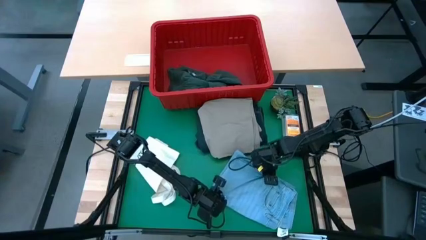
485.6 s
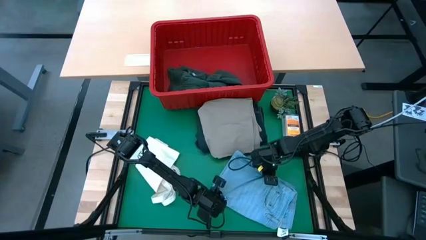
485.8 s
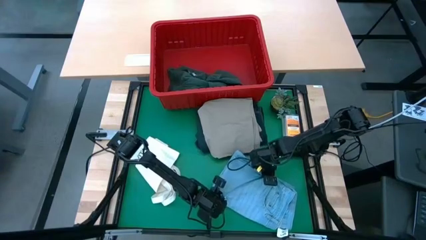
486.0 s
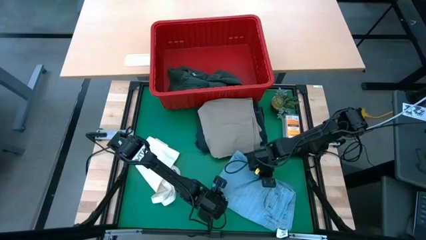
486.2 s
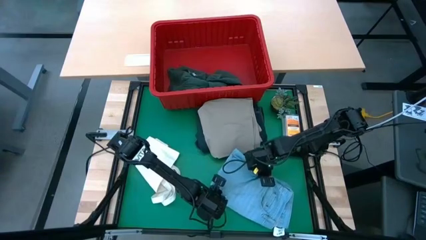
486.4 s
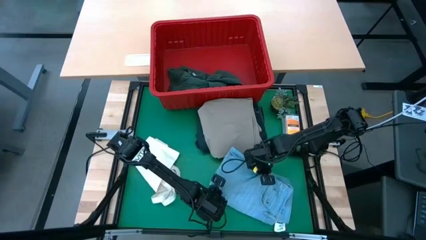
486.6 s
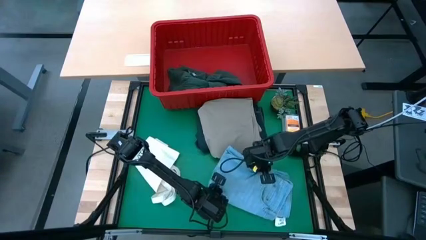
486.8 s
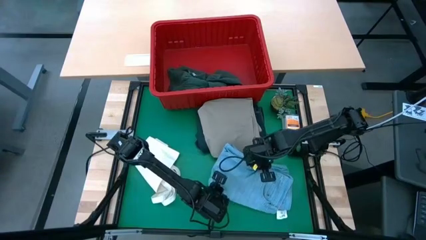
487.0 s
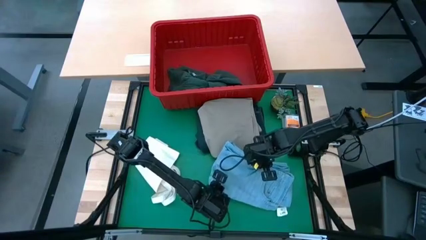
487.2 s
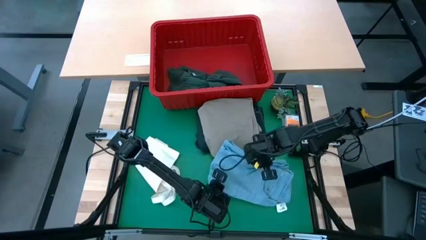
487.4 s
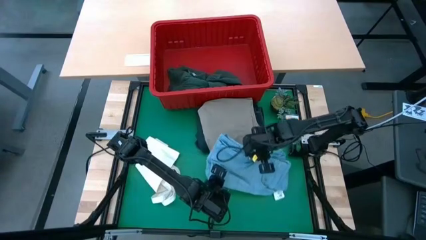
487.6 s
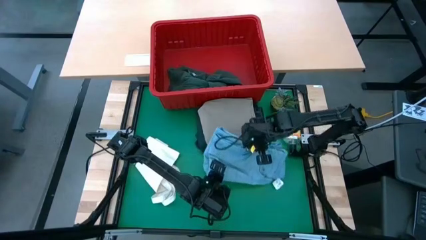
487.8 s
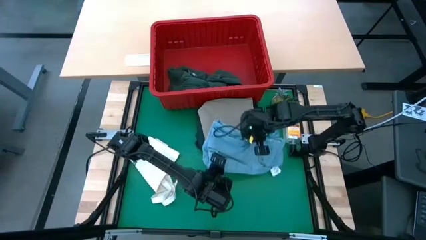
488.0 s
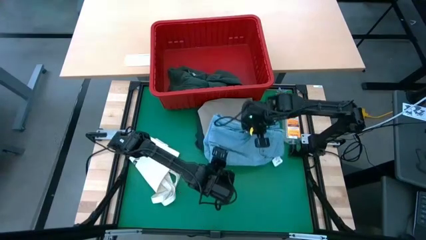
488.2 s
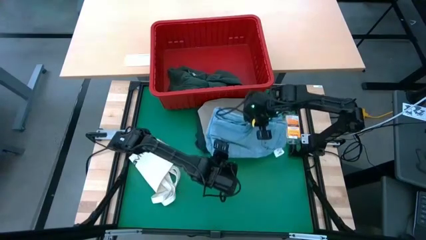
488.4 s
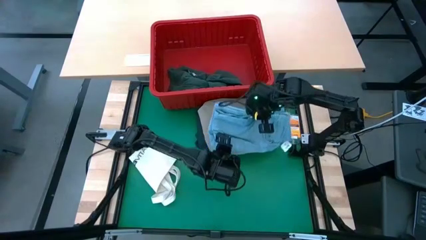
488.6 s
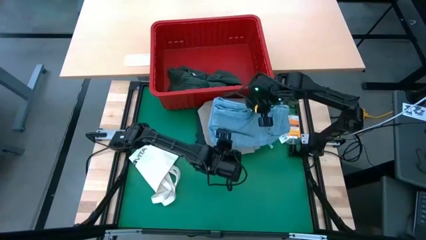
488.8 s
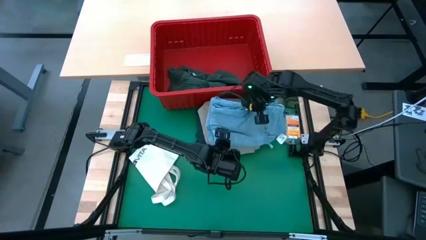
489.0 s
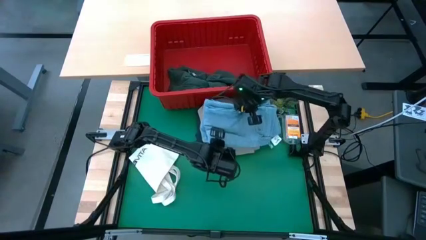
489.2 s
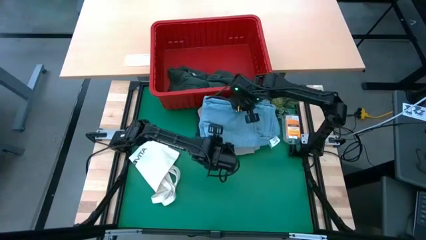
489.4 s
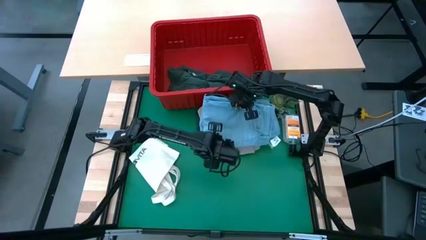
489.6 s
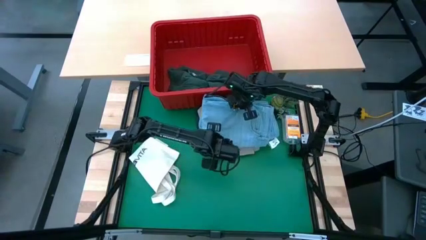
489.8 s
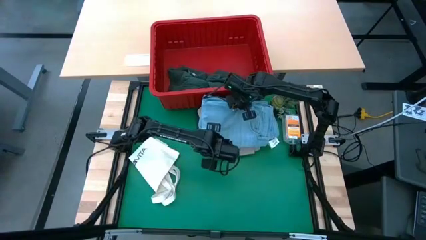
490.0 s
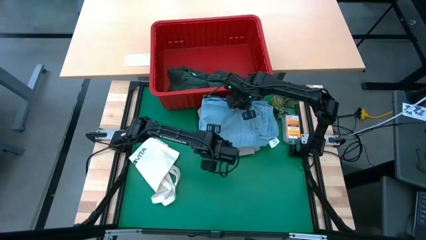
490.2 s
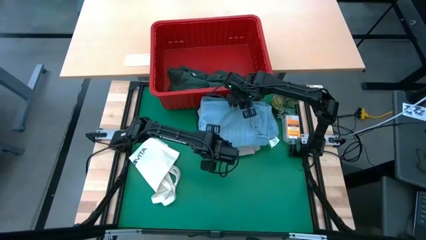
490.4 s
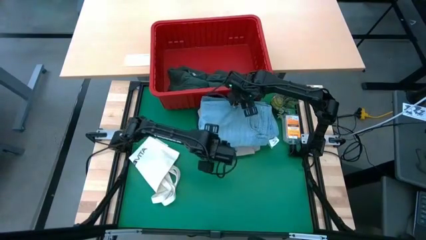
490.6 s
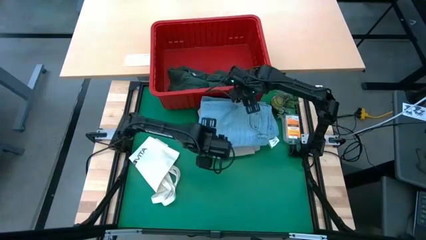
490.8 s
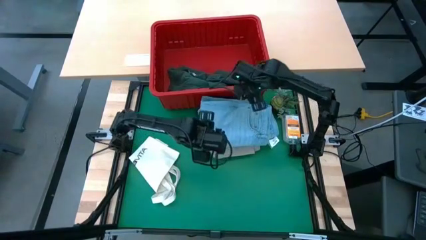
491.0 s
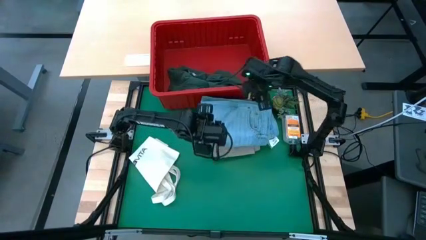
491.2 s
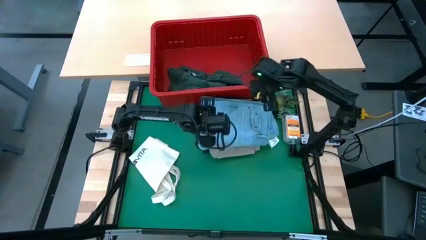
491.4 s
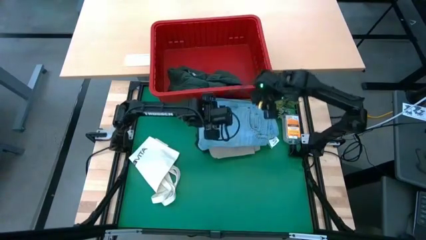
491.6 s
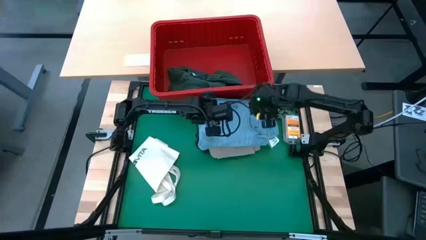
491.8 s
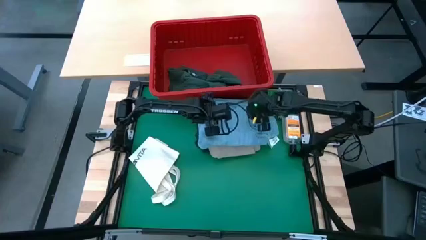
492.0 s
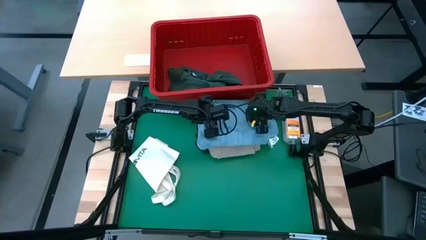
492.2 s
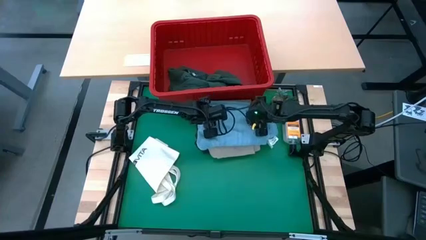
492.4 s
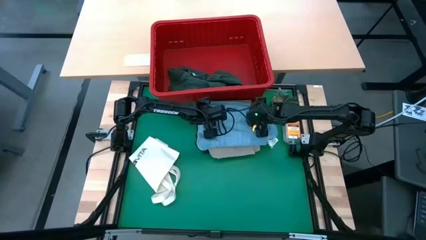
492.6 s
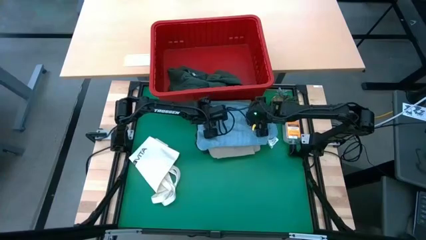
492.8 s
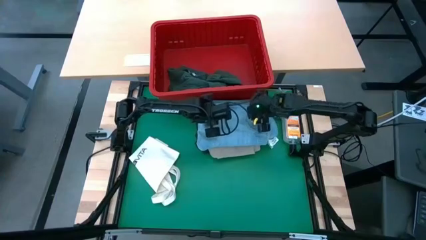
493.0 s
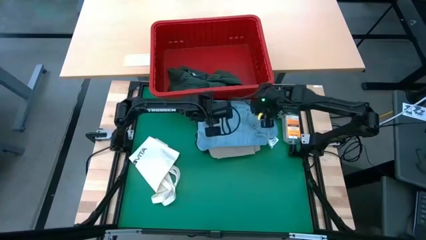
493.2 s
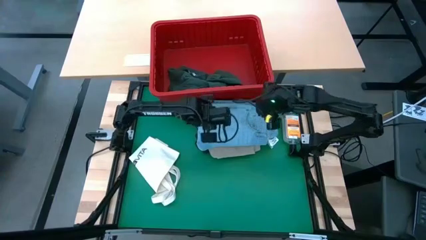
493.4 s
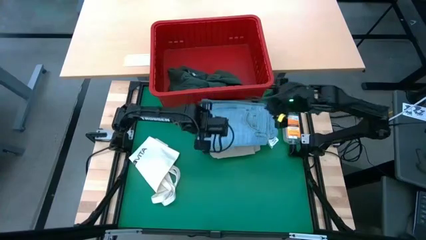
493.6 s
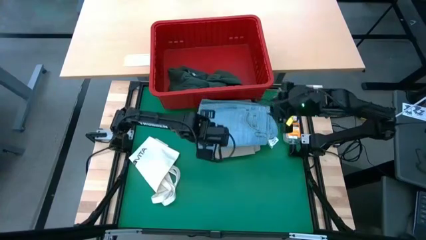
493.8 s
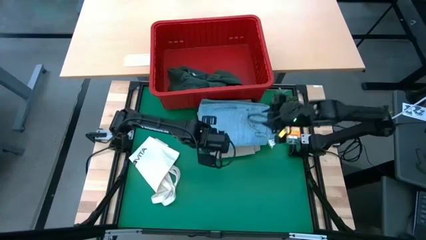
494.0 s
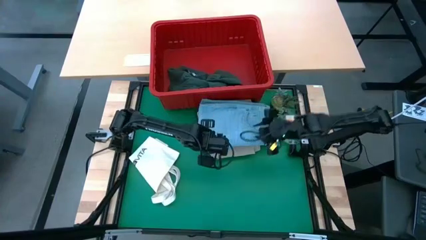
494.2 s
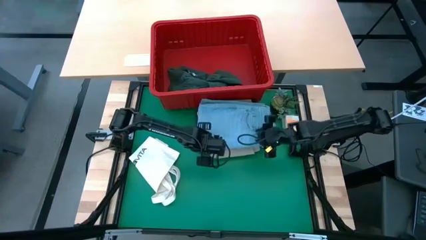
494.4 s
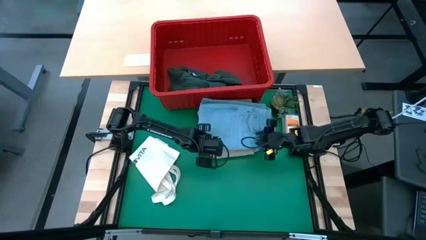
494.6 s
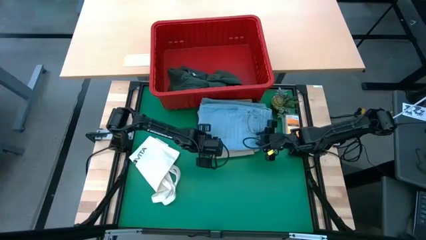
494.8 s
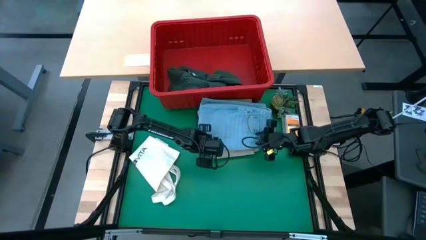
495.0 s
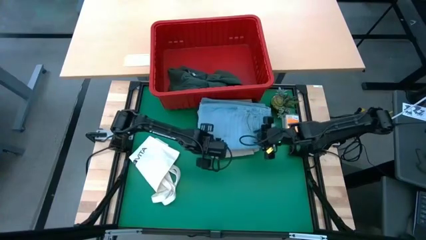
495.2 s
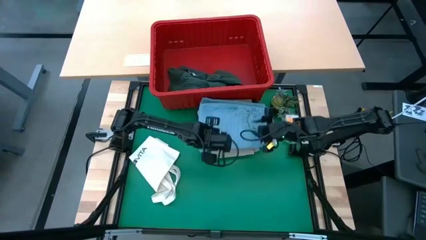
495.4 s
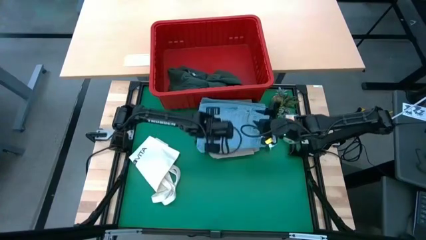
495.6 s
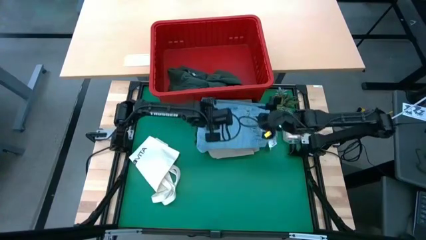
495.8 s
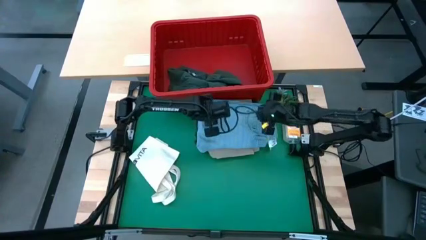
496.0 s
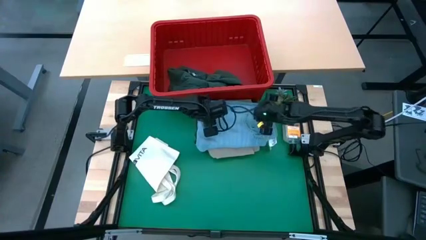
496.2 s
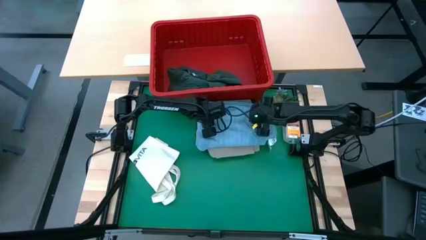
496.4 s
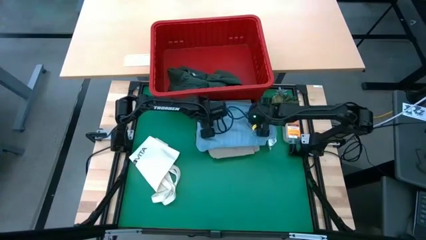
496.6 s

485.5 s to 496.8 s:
Task: Fold laundry
Stack the blue pants on the brown shorts

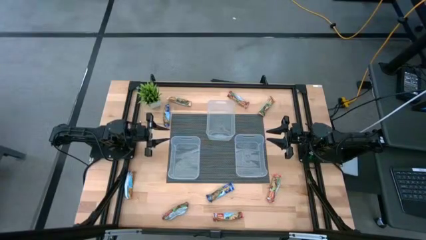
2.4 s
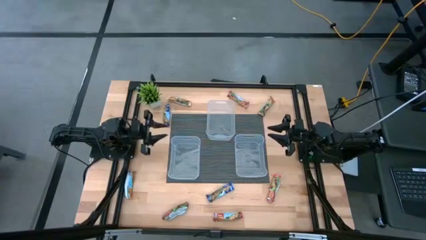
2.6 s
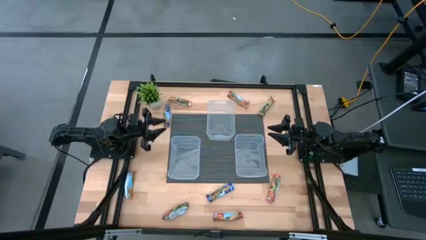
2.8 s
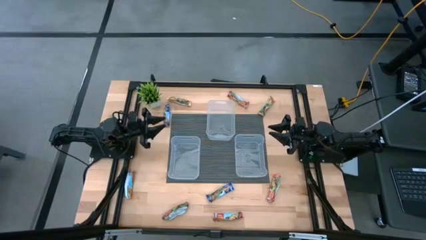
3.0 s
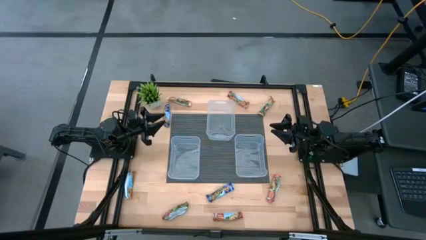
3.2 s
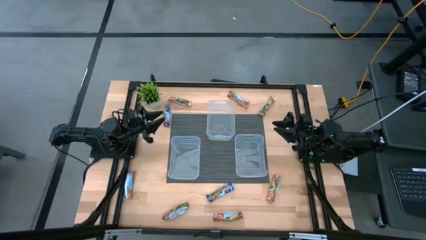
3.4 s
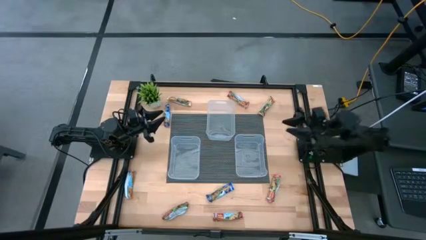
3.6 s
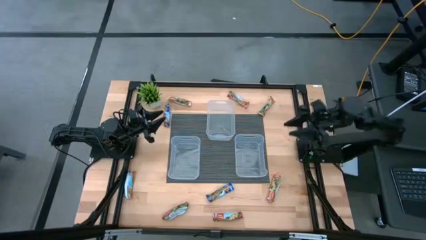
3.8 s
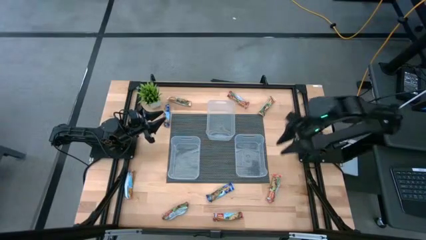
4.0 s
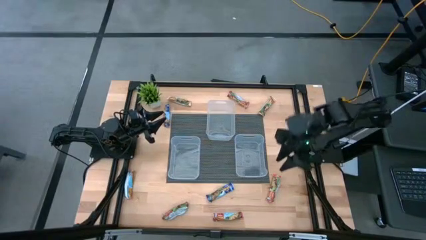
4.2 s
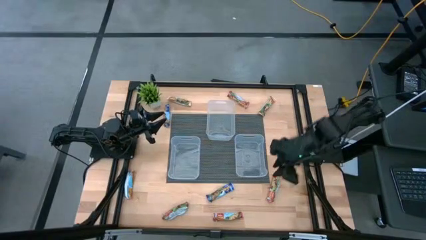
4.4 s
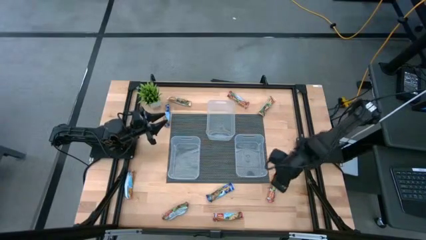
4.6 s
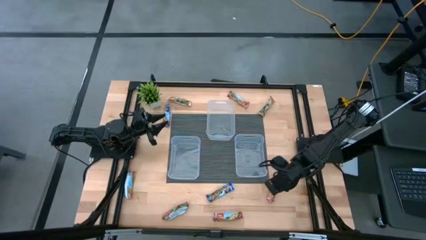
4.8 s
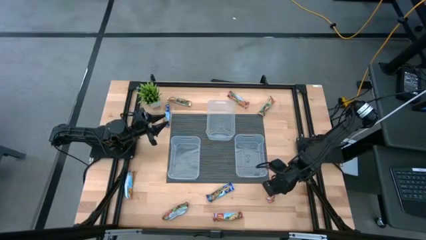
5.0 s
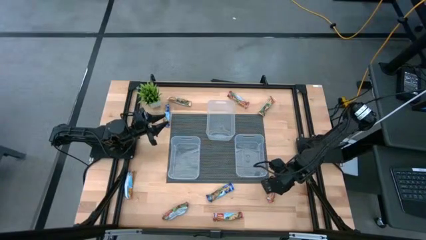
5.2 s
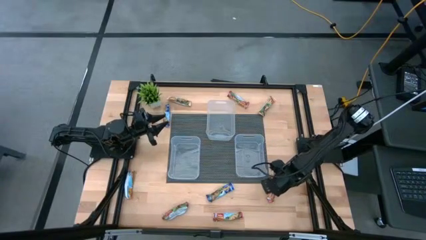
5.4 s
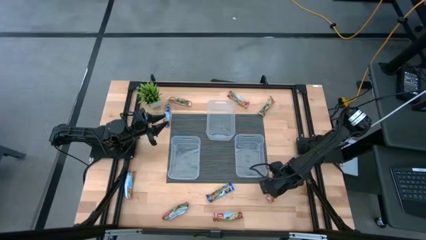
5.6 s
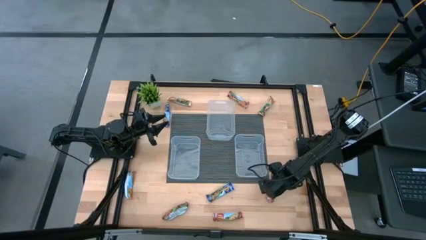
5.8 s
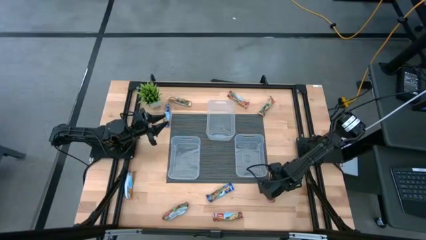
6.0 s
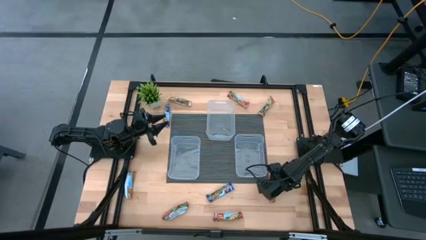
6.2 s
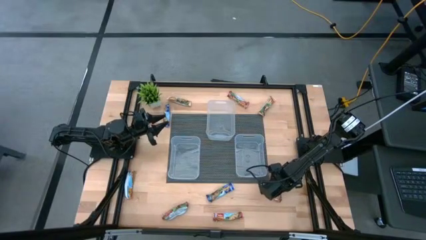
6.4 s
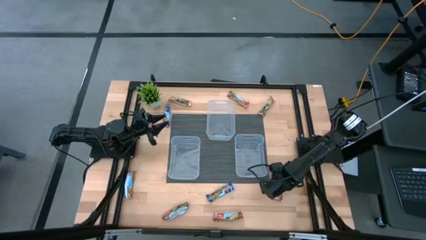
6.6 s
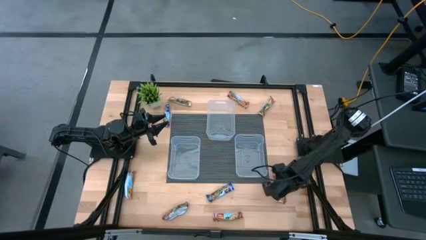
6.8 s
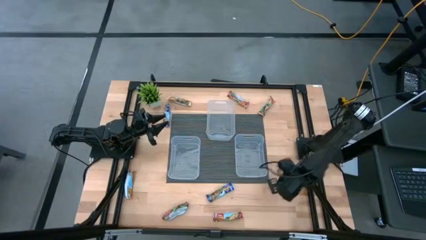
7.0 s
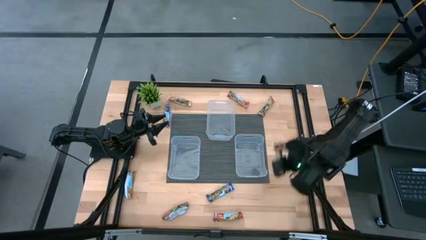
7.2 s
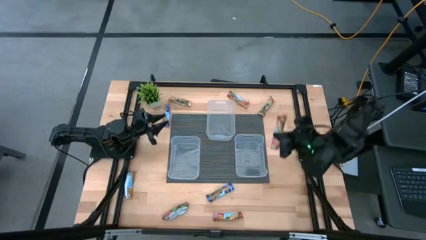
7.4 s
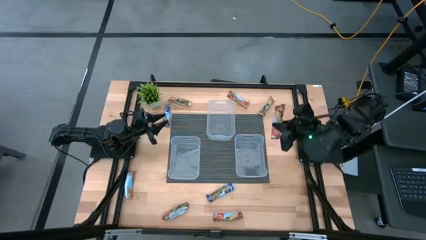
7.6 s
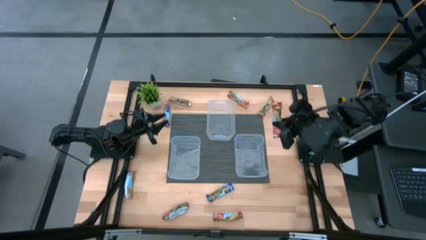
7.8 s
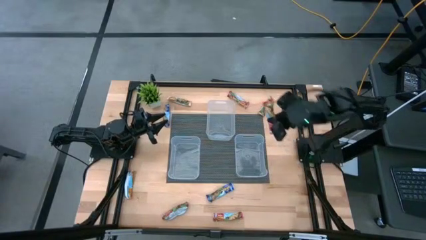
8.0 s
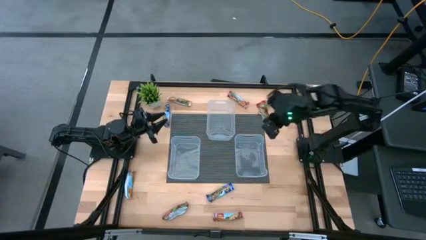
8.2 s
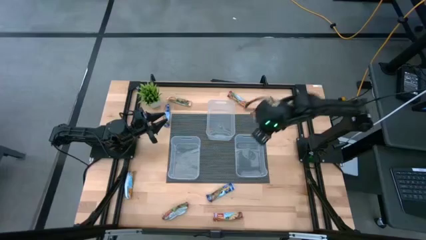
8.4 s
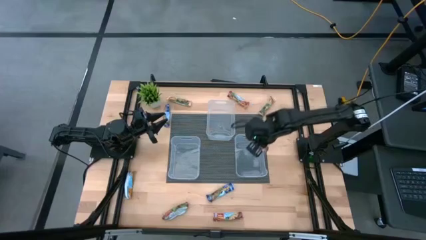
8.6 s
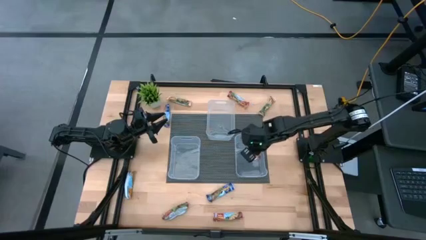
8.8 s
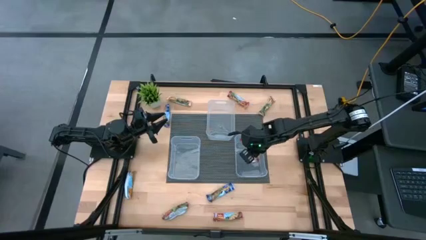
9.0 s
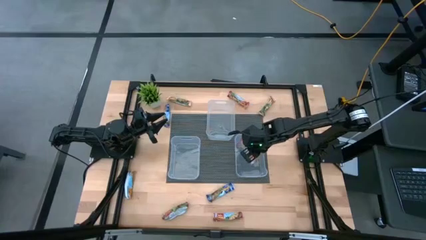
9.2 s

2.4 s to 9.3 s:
Task: Pick and place Granola Bars by type
Put the red granola bar into the bottom right transparent bin
